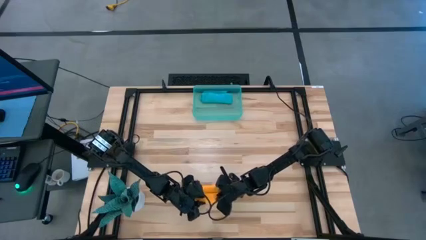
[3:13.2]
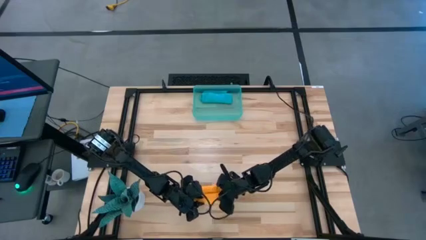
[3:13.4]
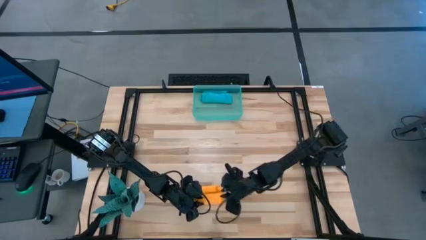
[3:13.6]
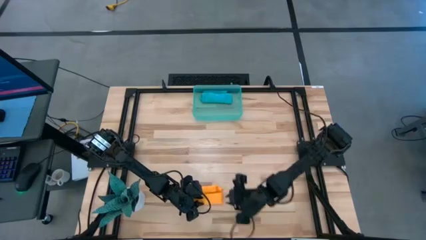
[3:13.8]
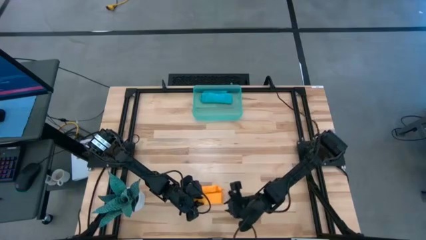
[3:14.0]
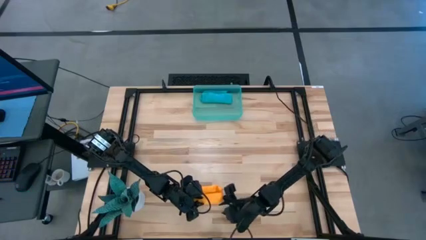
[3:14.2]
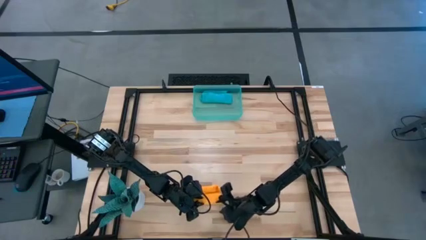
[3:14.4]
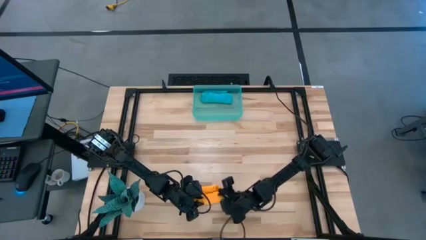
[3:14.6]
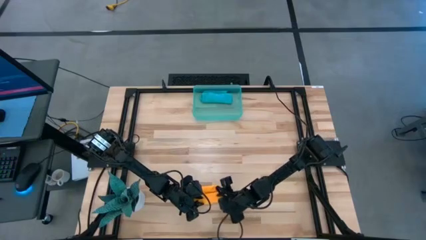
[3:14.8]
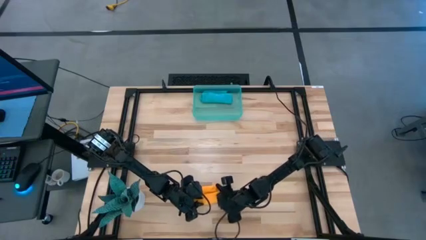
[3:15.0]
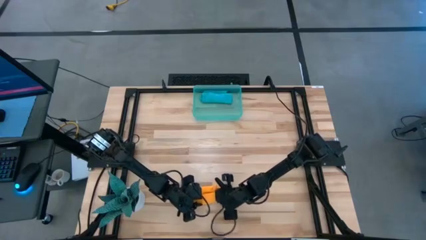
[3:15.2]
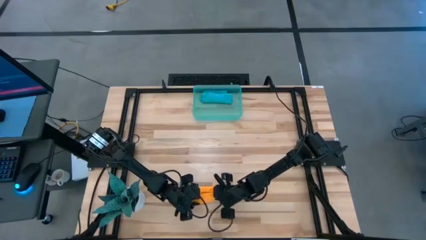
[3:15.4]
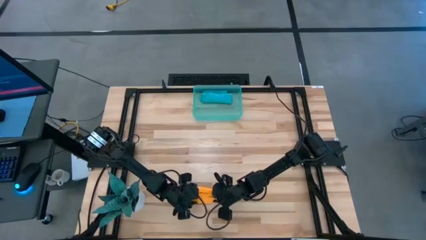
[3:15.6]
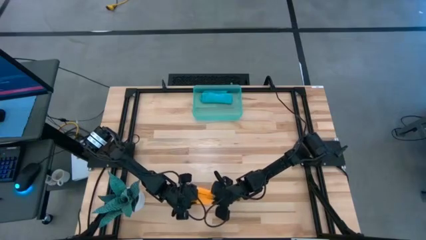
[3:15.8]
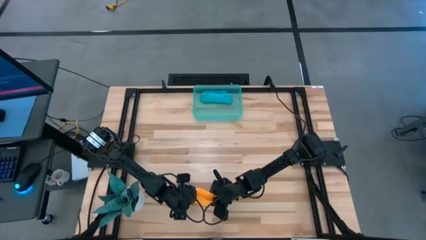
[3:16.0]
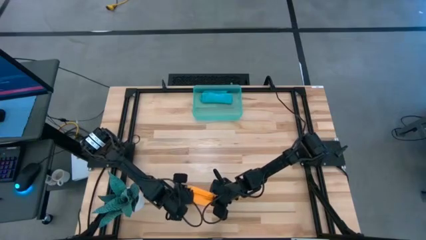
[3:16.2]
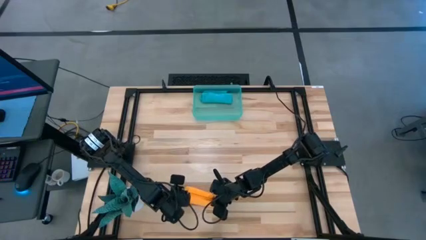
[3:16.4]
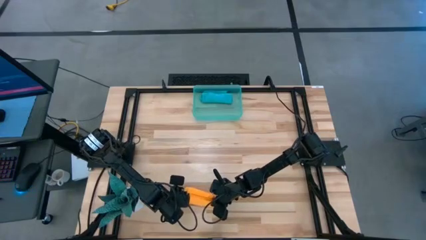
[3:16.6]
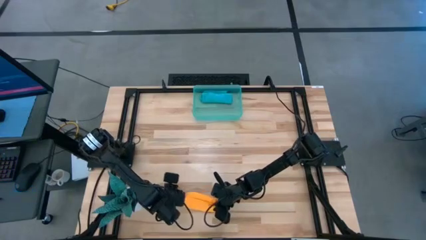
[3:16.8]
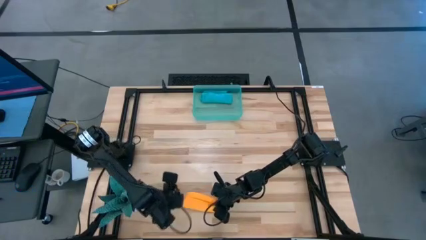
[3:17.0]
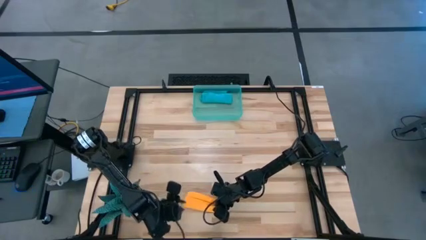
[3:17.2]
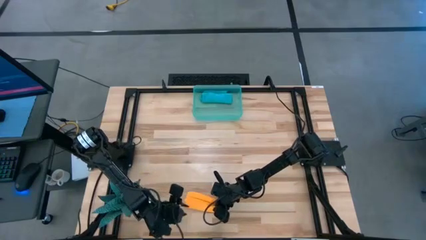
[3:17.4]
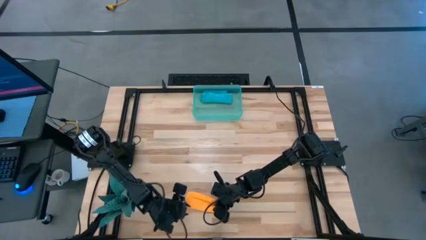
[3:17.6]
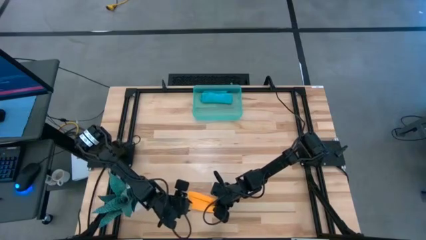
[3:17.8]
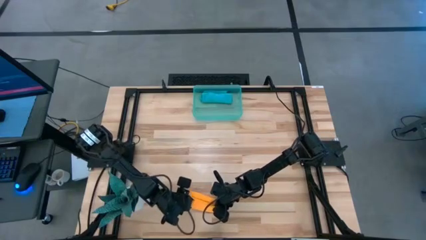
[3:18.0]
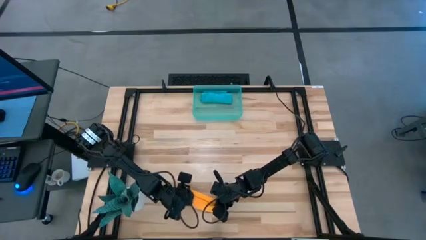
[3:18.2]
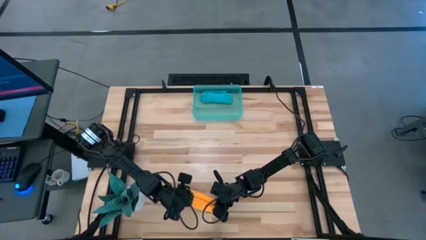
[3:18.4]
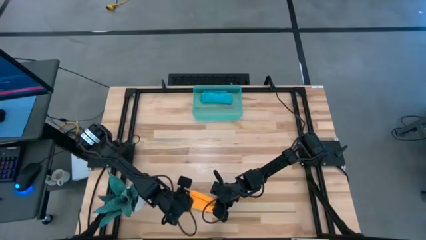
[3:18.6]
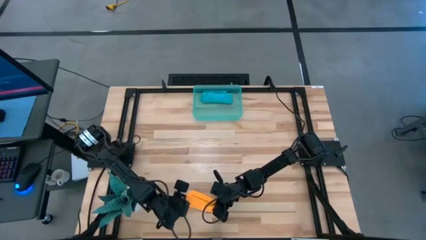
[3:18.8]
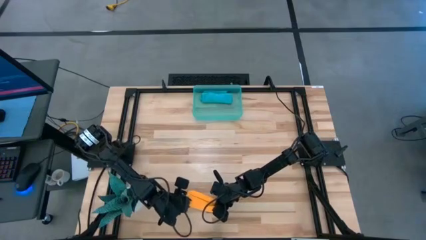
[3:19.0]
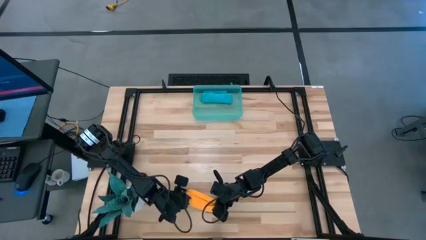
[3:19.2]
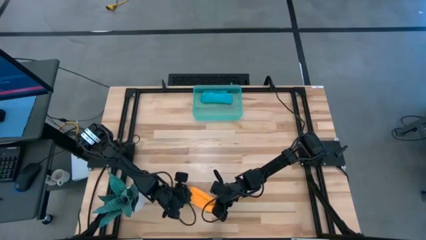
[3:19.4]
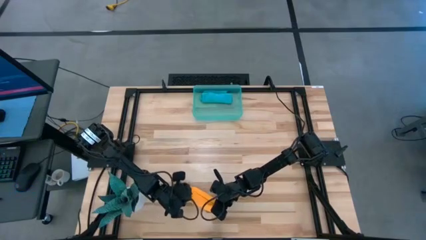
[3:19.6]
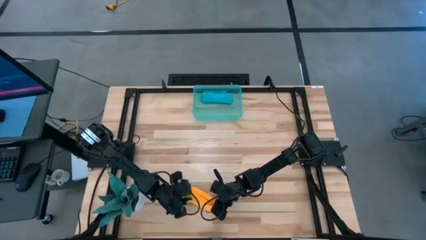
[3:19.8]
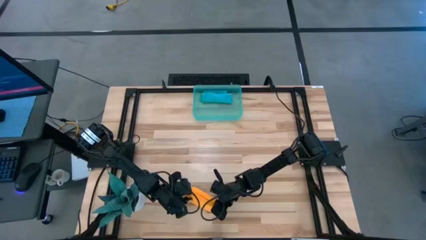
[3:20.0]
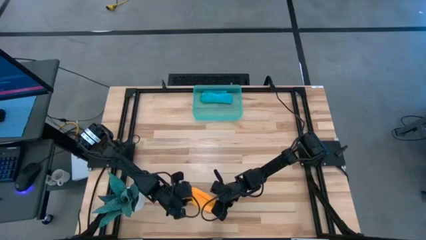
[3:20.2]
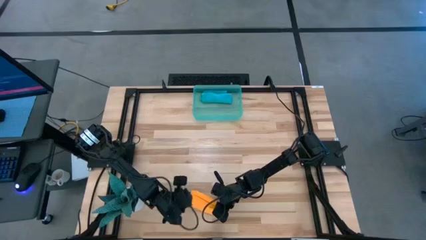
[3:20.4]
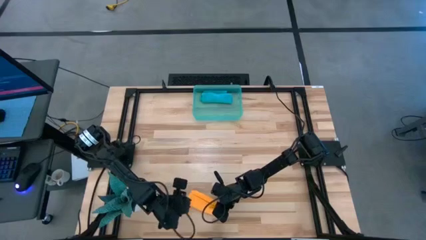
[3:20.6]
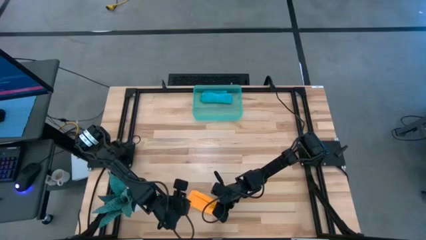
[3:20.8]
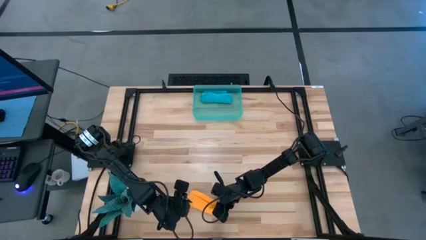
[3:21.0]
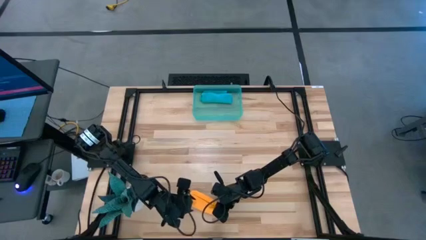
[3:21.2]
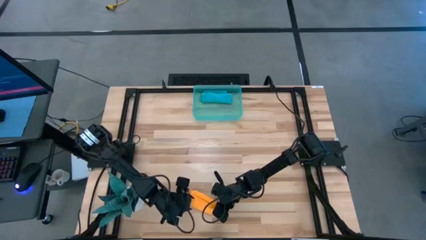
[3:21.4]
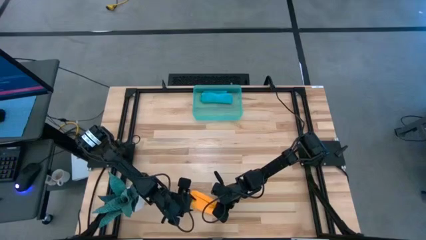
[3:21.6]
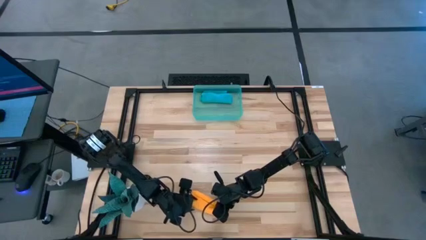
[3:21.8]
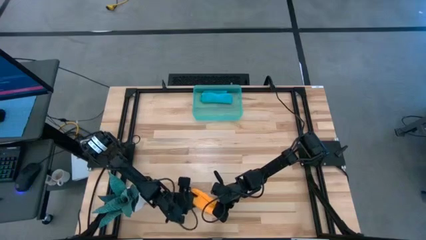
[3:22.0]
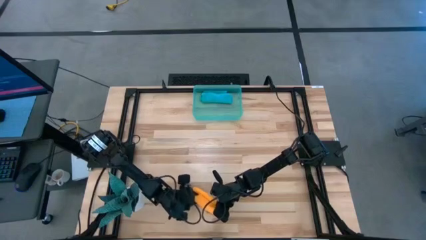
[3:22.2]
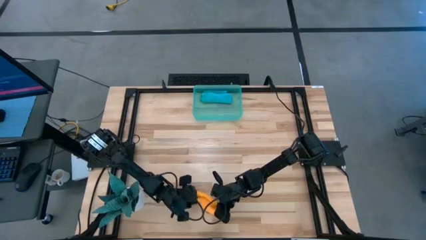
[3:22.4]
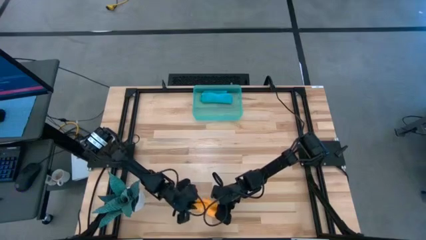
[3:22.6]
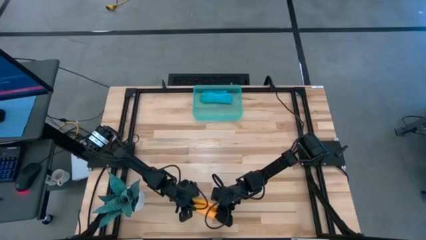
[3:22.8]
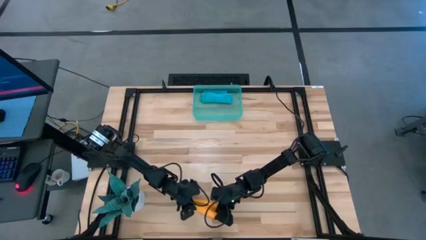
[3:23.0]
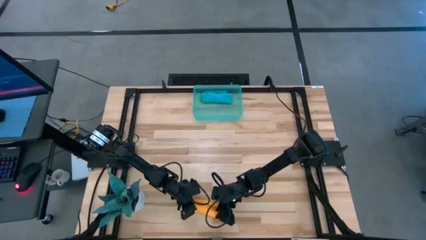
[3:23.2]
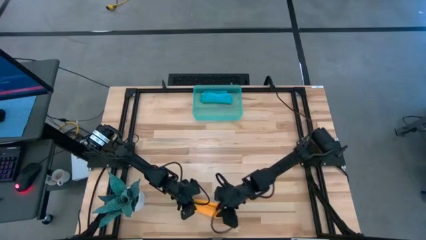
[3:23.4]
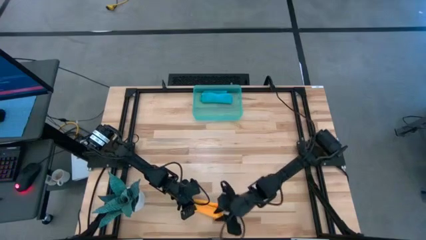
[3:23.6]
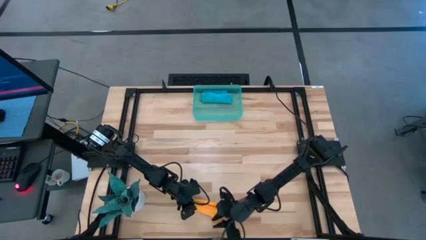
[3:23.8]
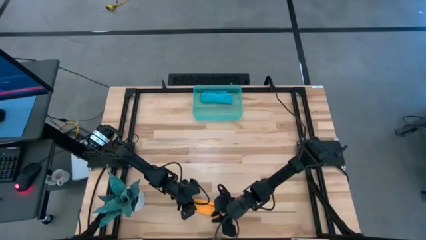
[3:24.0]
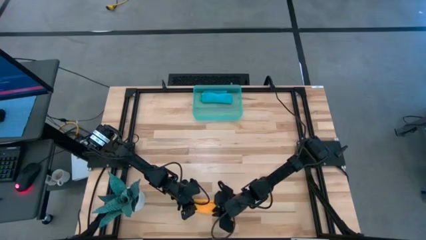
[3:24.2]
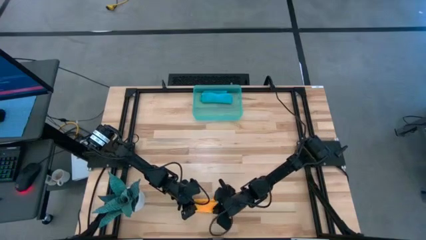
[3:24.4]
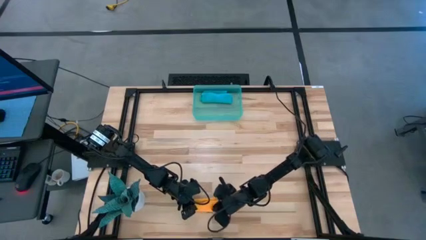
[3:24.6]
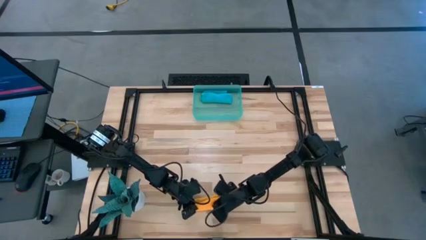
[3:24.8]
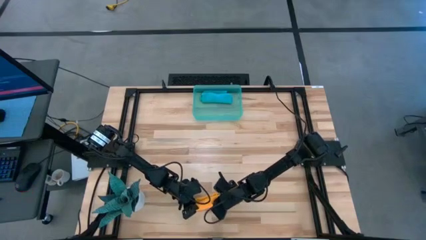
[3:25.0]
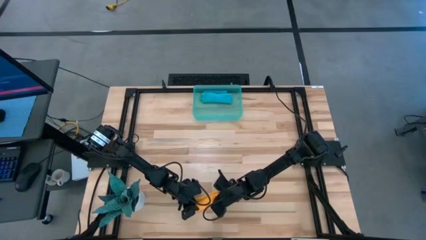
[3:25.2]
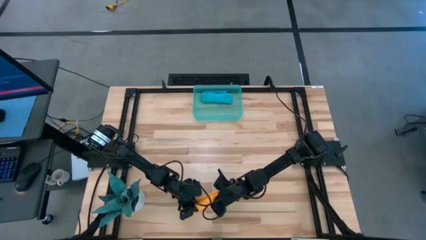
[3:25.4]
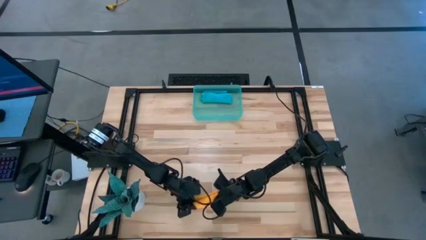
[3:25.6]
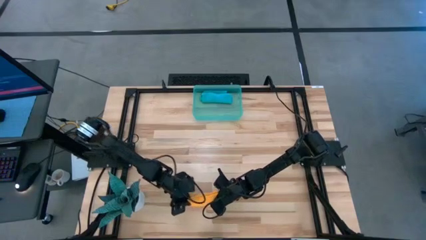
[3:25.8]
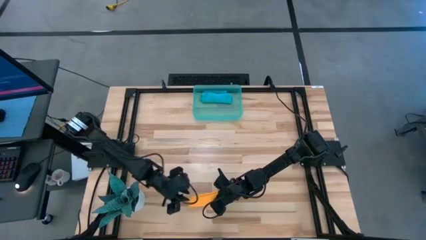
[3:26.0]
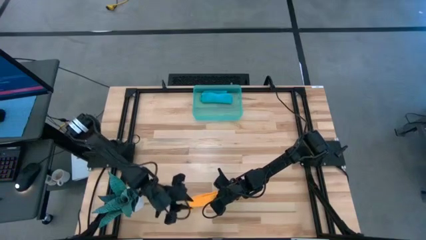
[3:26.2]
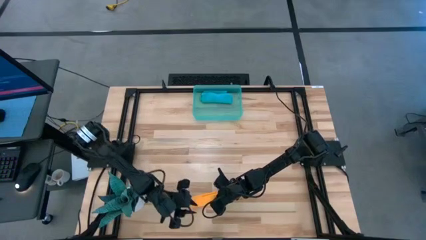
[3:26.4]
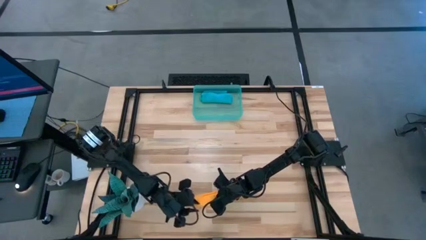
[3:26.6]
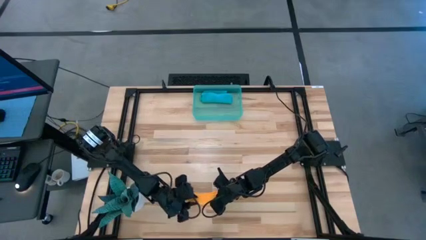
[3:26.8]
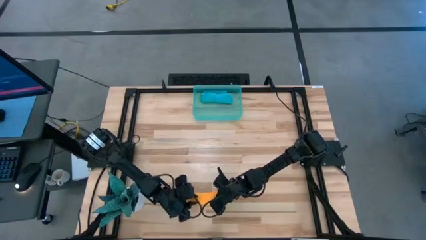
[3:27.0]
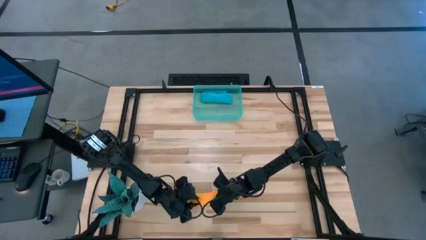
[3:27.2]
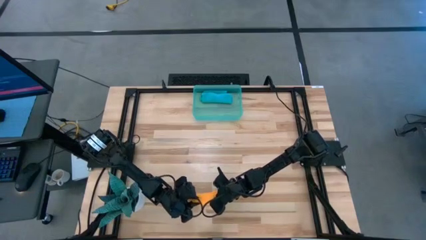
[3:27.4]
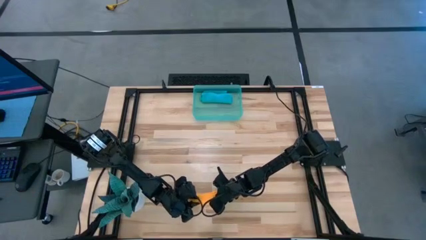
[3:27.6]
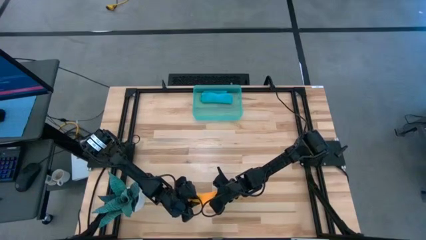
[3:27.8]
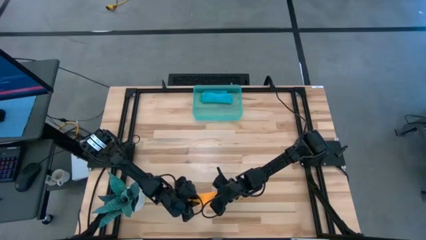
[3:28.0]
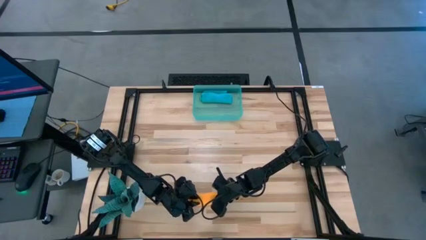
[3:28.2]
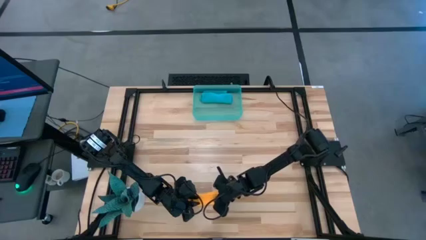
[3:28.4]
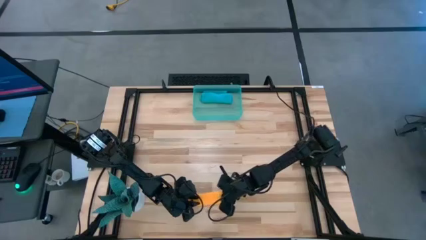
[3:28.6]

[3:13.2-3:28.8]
Task: Roll microfiber towels into tight, uniform cylinder then place into a basket
Roll the orange microfiber cloth
